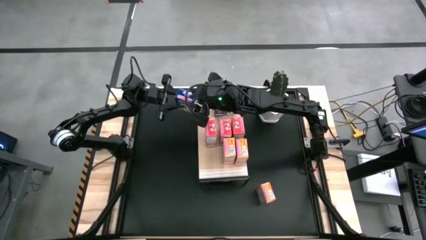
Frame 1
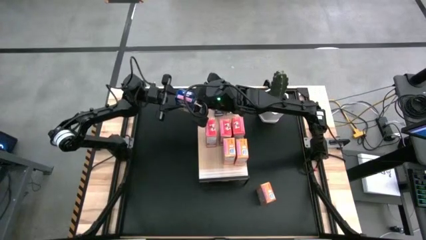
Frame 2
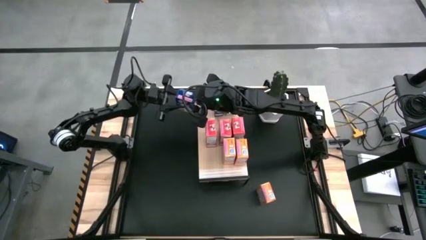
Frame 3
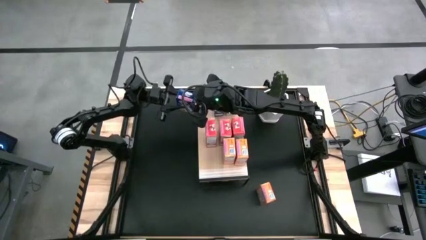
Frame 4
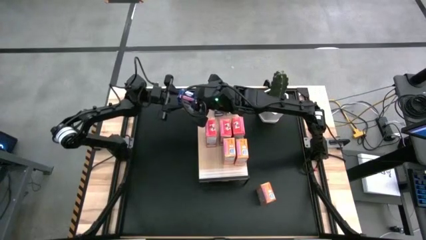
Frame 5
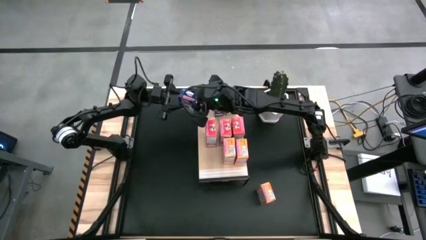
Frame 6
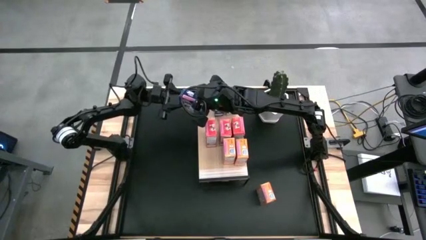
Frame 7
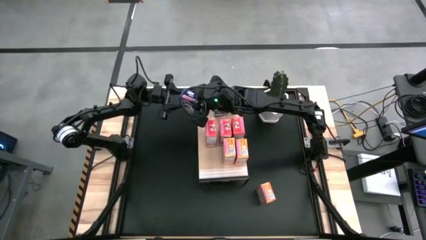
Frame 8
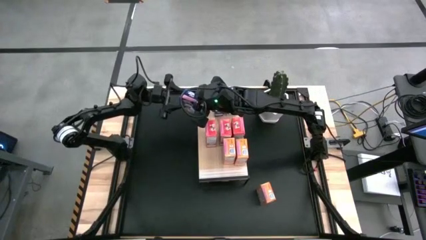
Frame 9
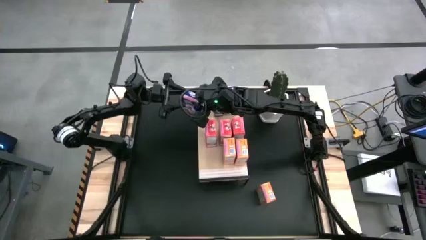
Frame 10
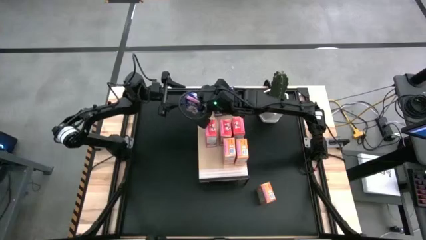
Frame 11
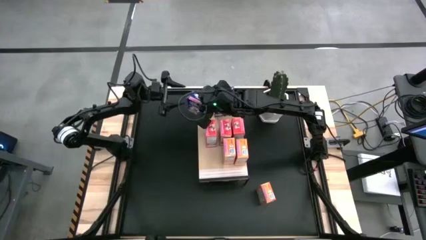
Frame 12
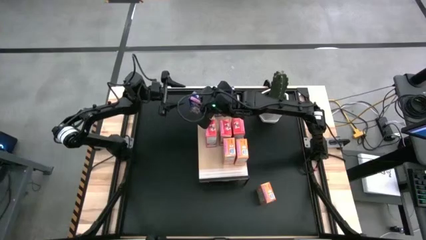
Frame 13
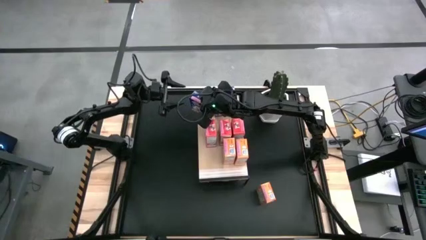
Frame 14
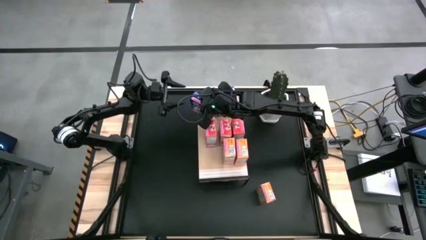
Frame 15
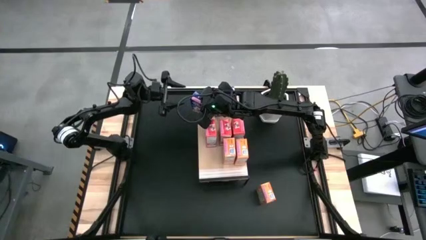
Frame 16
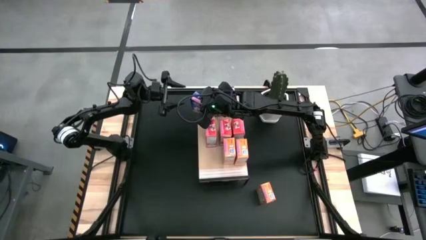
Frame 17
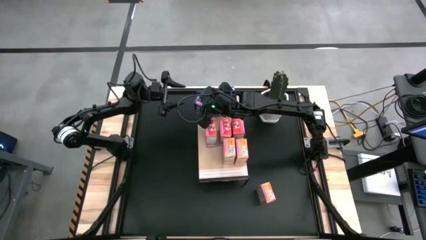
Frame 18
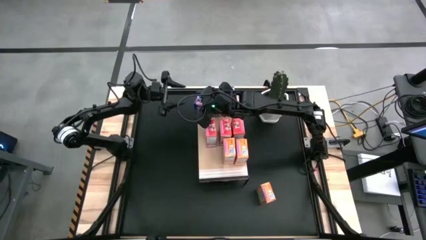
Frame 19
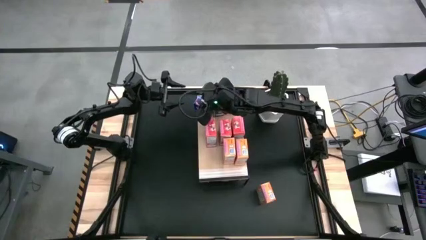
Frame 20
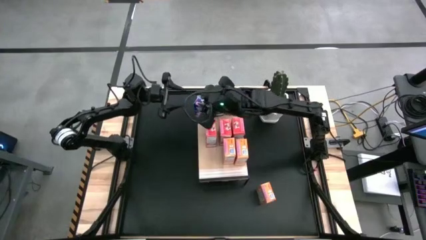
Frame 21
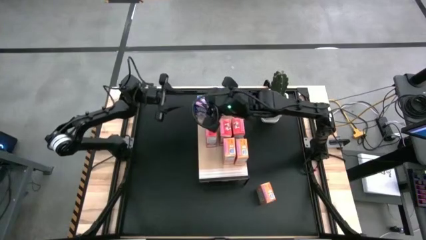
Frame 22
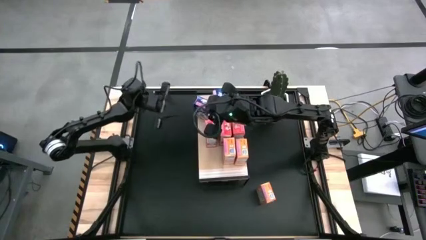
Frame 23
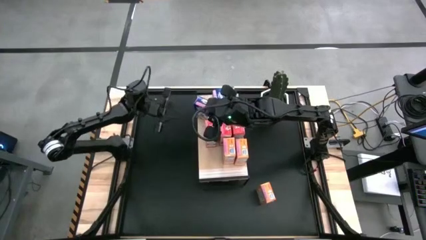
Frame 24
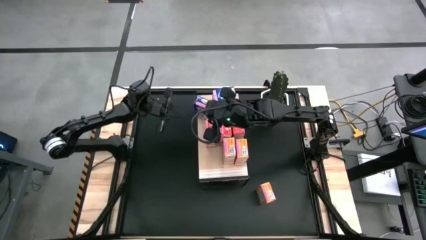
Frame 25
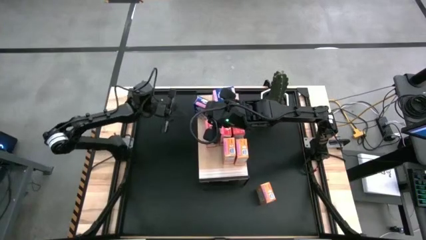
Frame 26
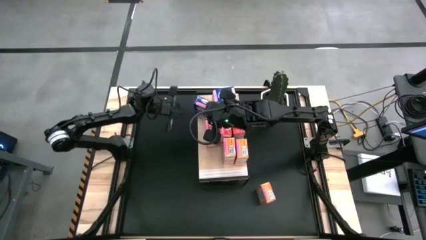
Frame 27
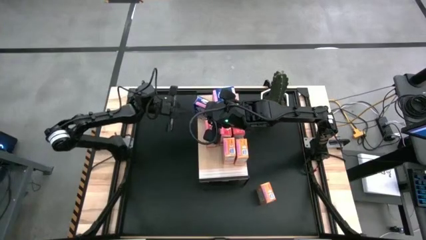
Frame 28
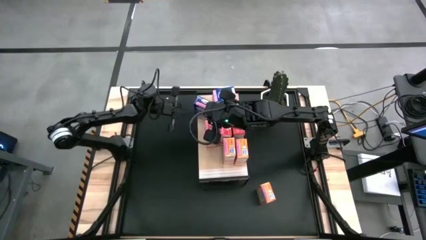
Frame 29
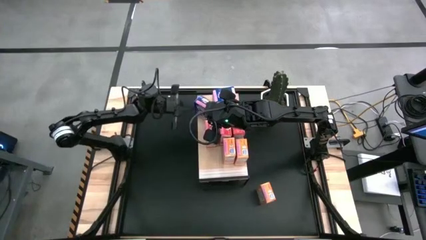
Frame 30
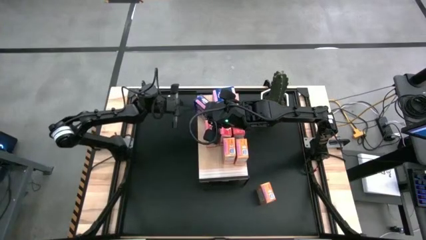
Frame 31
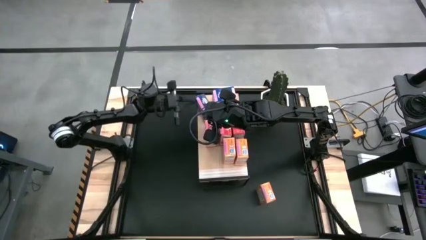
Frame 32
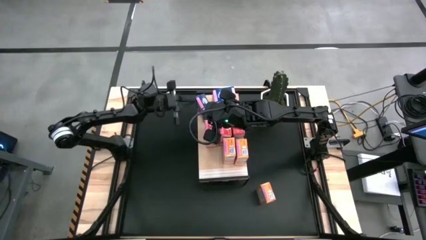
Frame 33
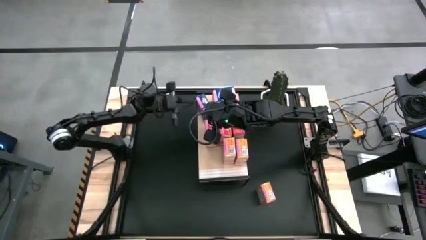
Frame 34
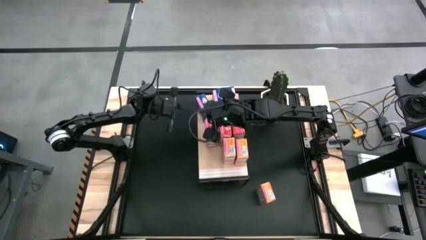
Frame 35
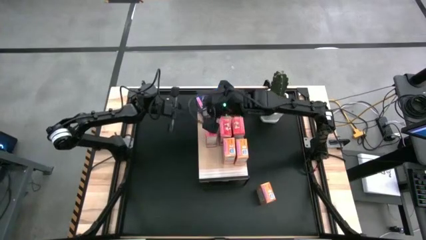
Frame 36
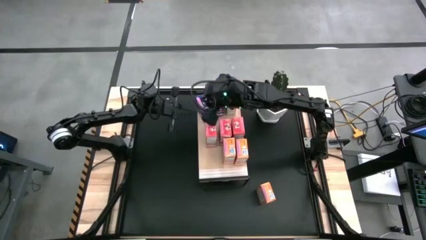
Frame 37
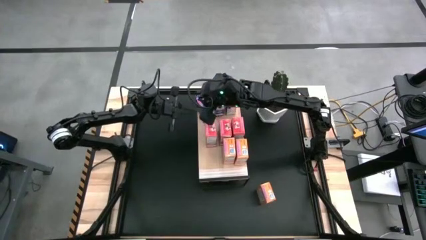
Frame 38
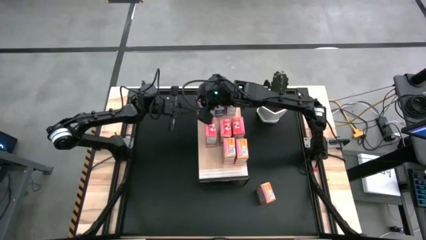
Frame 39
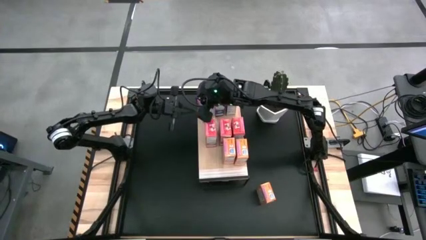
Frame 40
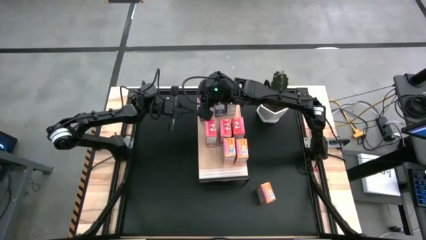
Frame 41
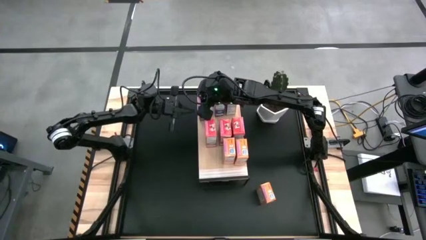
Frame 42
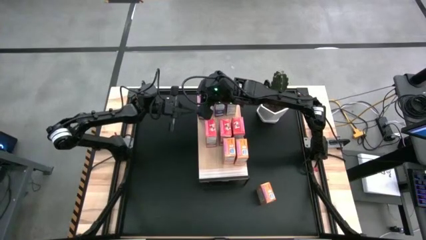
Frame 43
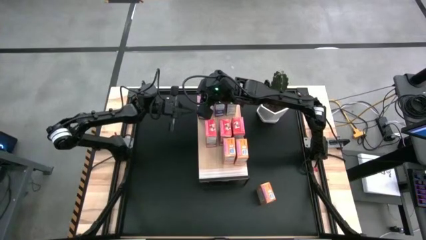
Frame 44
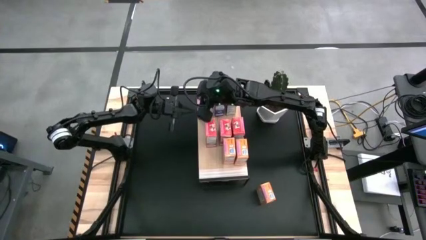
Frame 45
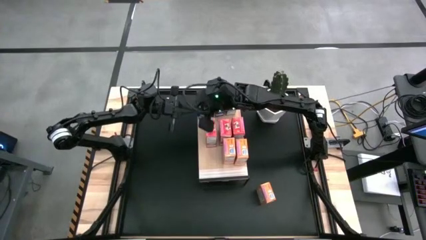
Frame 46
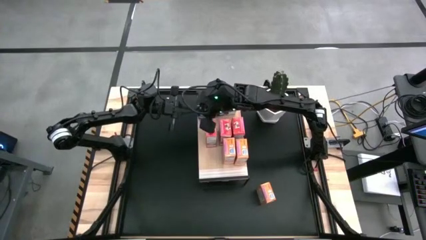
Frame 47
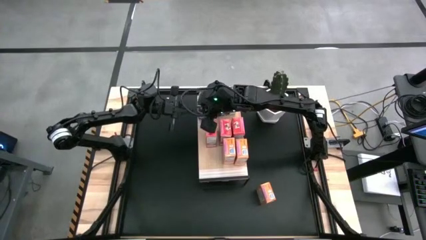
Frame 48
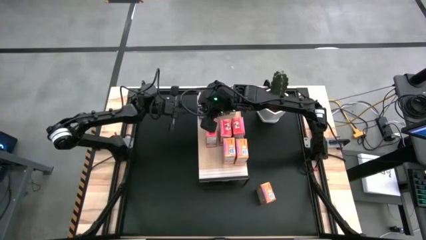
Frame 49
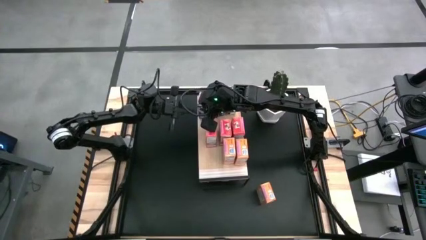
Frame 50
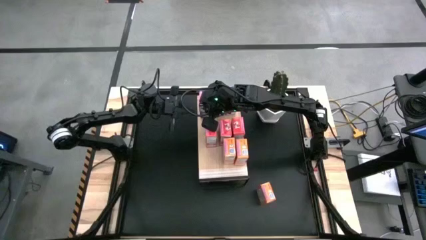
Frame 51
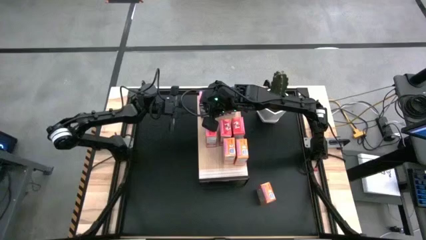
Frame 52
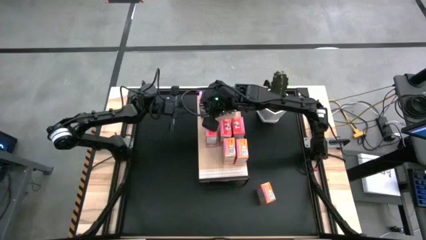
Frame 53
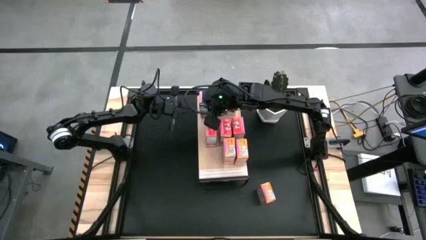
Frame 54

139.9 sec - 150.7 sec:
Task: Stack cereal on shelf
Put the blue cereal box aligned with the other red cereal box on the shelf

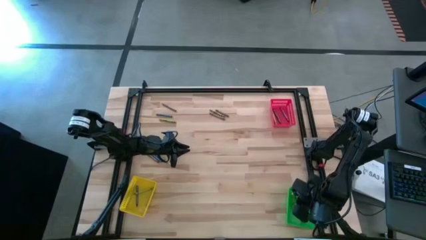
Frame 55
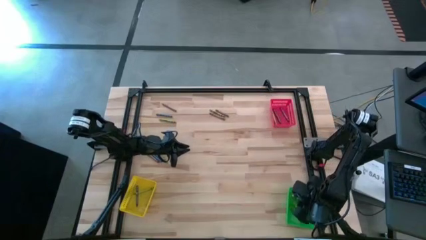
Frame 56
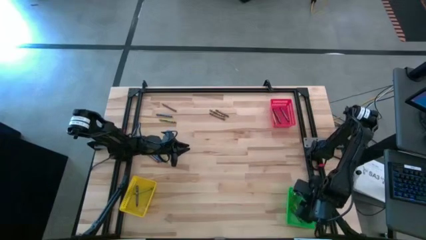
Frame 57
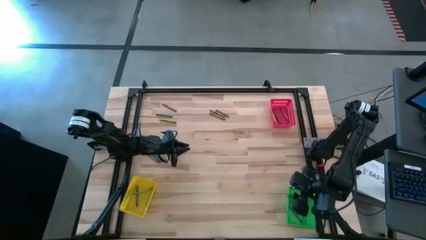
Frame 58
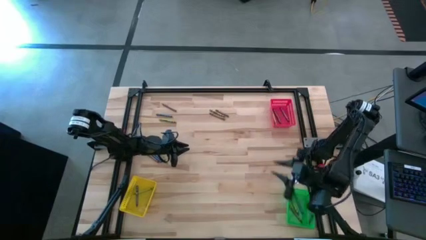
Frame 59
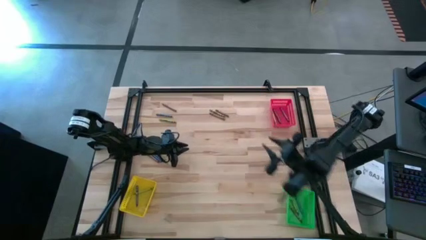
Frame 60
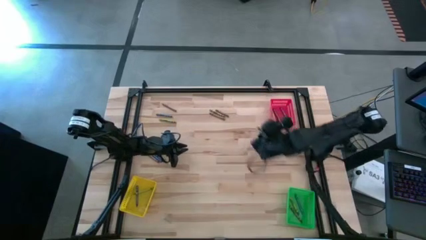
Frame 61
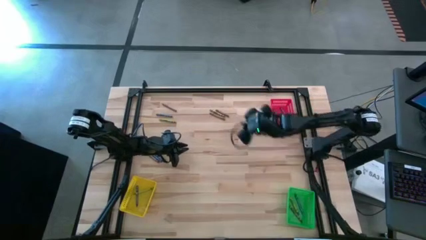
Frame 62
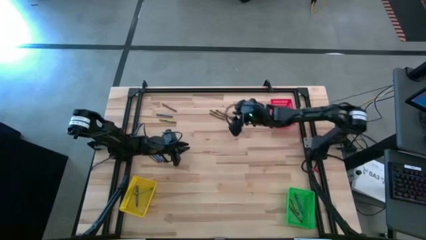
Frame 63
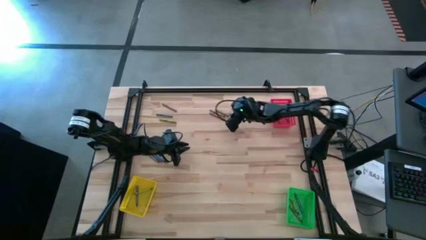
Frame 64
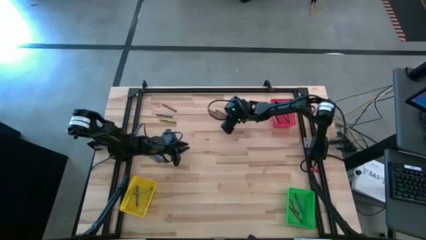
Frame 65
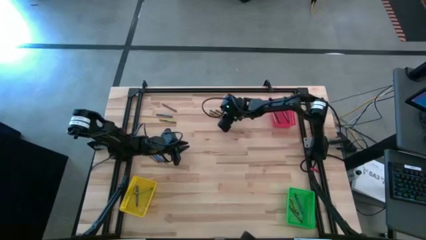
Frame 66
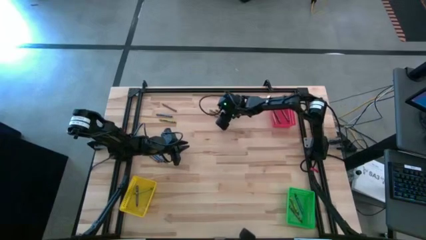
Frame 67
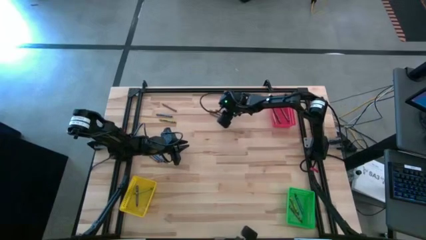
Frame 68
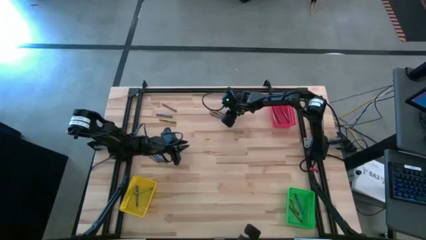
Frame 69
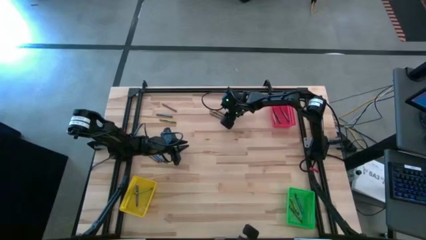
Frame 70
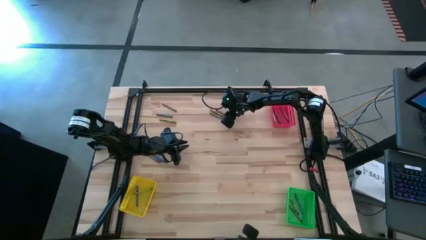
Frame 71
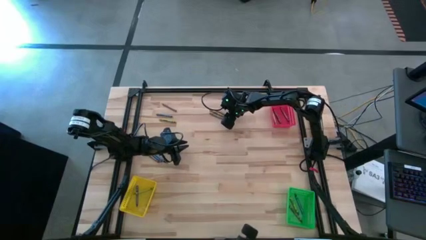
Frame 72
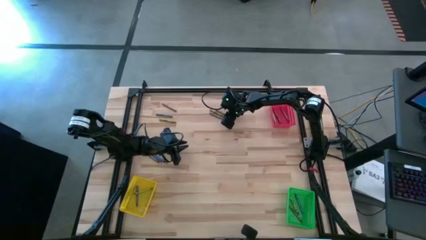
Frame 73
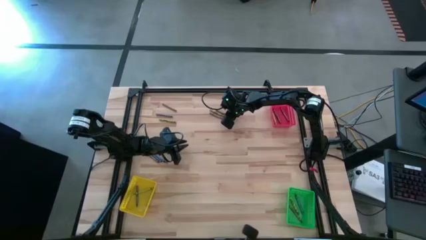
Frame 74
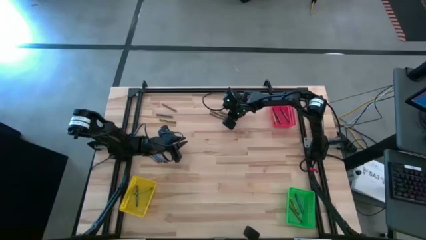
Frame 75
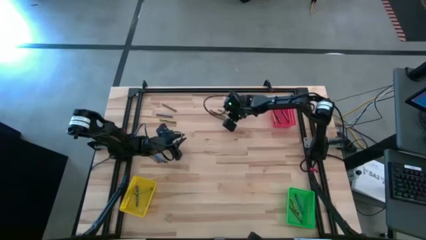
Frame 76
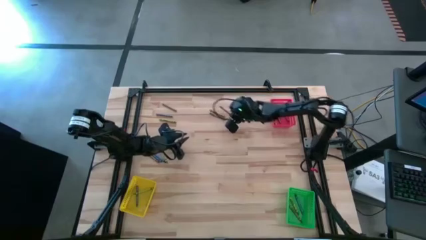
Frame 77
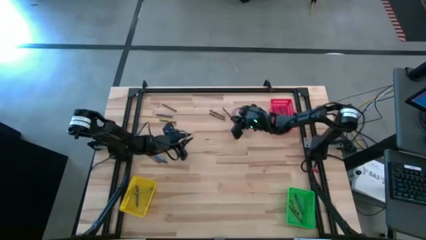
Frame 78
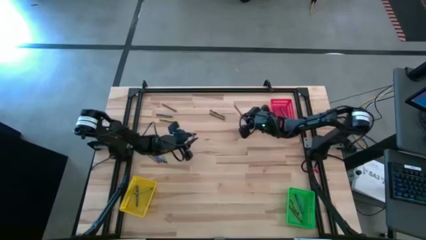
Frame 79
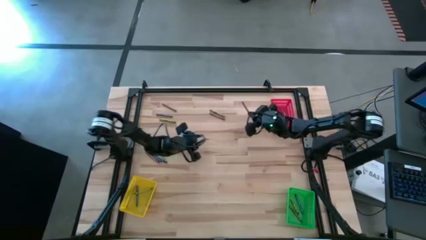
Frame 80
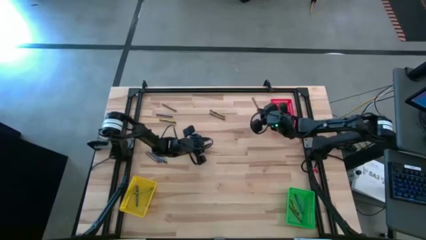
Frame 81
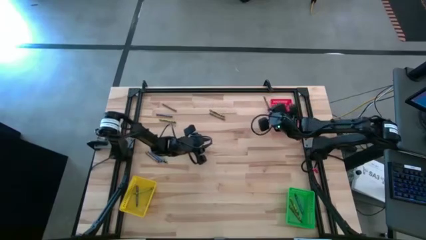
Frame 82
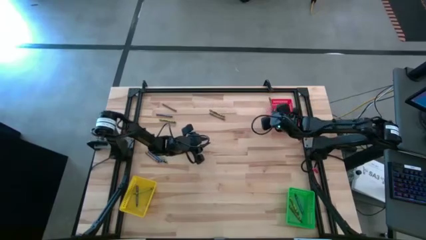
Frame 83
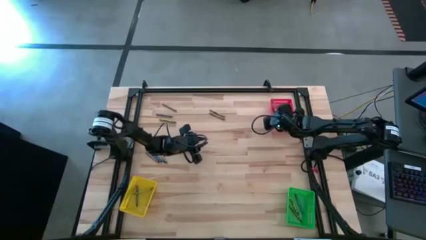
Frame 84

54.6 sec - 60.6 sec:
Task: Sort crayons
Put the brown crayon into the red bin
